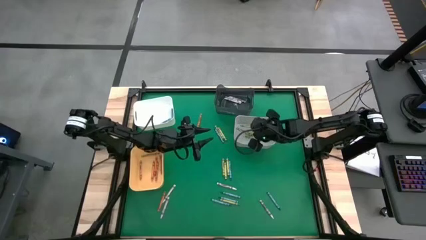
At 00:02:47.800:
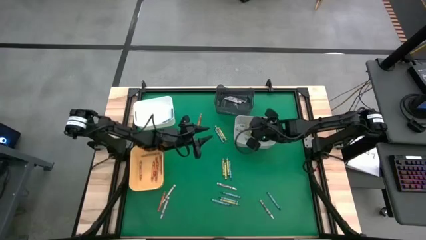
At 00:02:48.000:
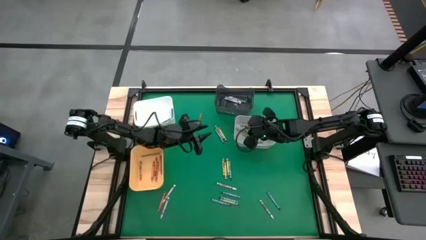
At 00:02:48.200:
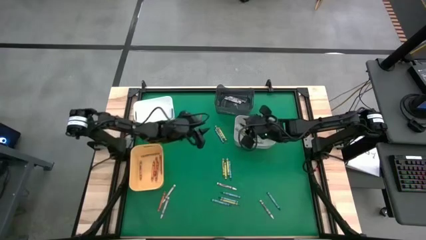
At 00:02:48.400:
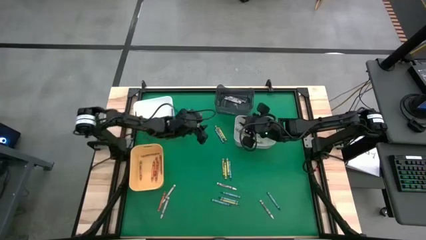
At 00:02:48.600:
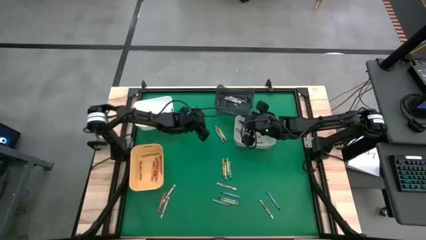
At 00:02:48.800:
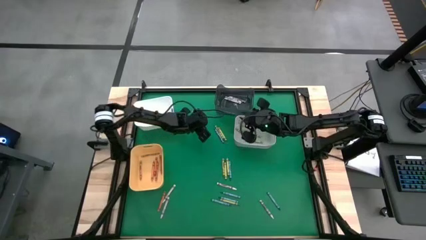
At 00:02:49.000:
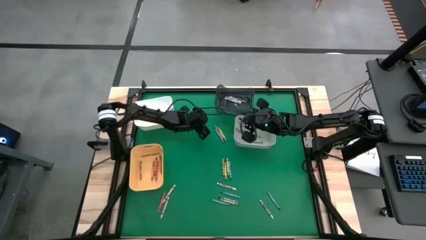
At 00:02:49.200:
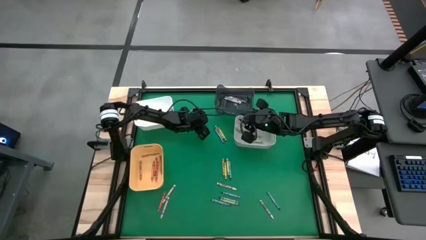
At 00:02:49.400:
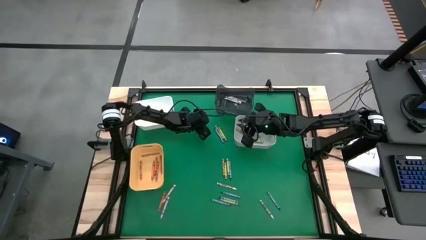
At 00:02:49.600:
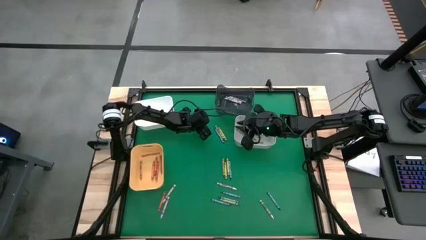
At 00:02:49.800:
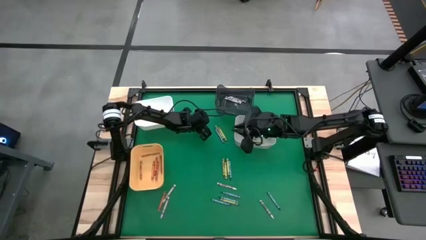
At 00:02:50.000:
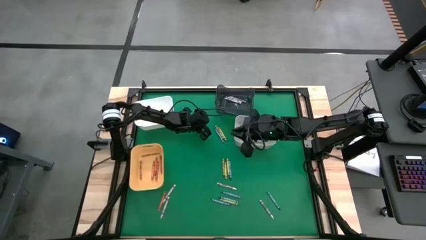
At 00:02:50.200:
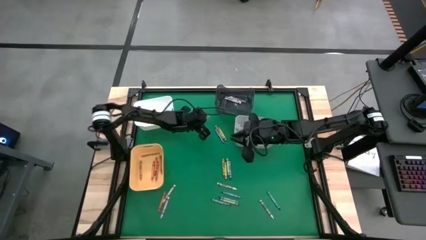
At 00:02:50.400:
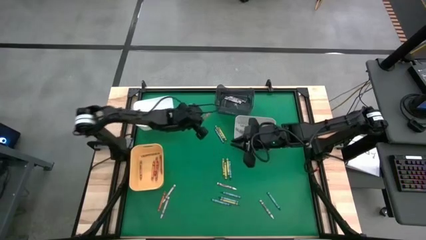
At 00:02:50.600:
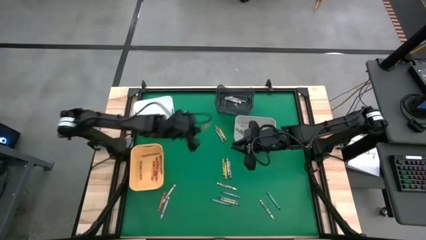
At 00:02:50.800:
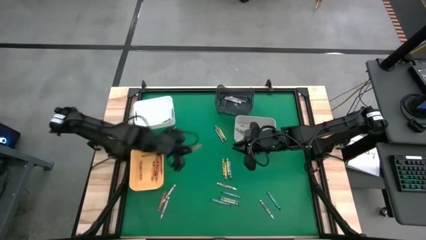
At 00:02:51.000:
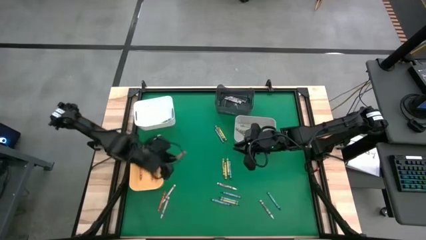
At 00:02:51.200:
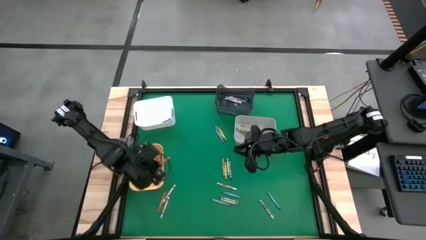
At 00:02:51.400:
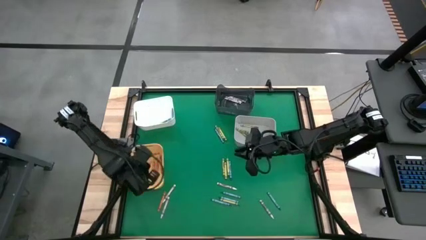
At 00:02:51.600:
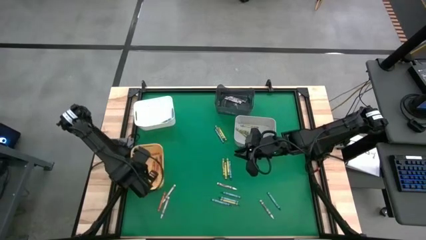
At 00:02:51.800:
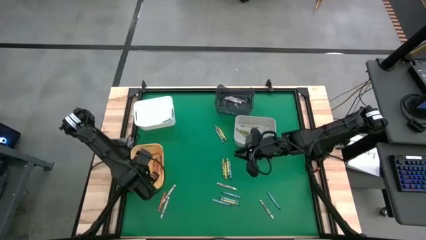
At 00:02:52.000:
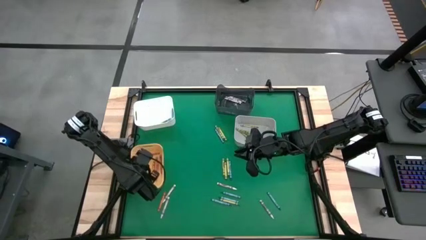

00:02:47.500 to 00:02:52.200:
Task: Sort crayons
Put the orange crayon into the orange bin

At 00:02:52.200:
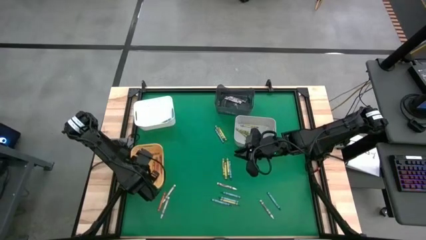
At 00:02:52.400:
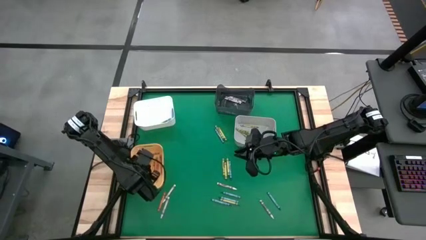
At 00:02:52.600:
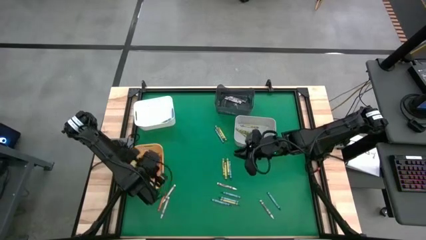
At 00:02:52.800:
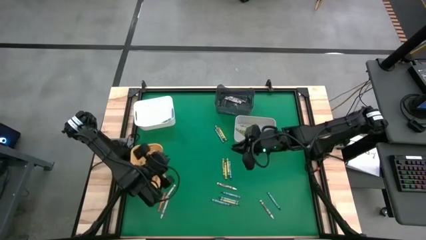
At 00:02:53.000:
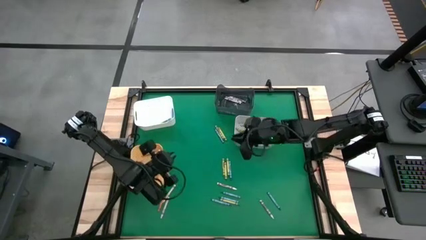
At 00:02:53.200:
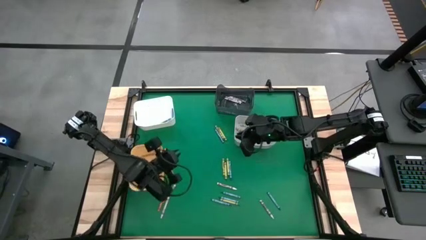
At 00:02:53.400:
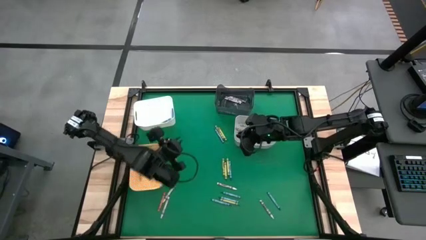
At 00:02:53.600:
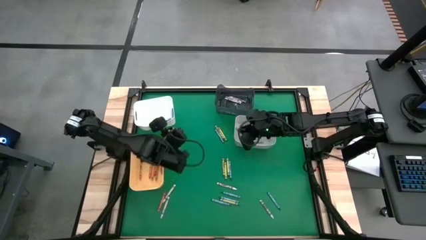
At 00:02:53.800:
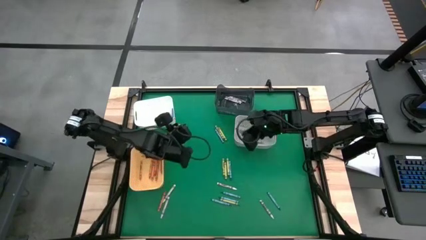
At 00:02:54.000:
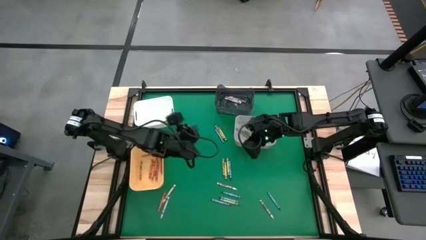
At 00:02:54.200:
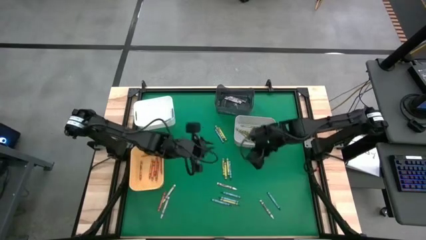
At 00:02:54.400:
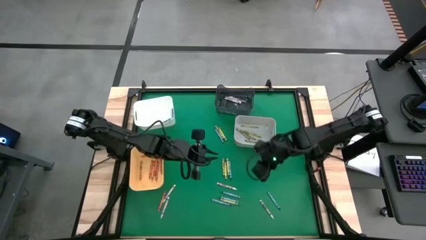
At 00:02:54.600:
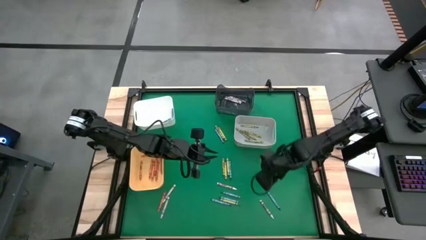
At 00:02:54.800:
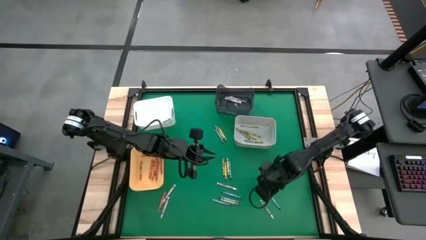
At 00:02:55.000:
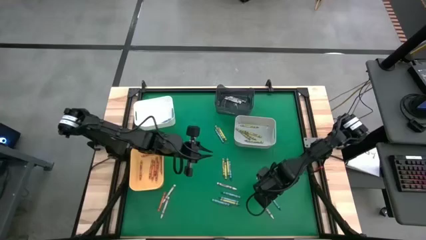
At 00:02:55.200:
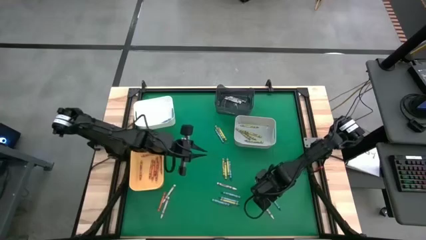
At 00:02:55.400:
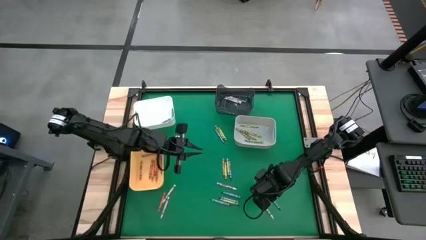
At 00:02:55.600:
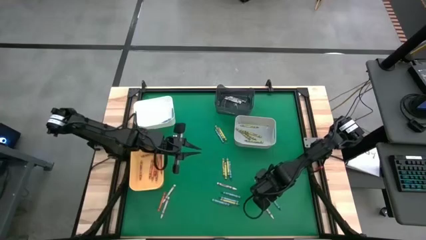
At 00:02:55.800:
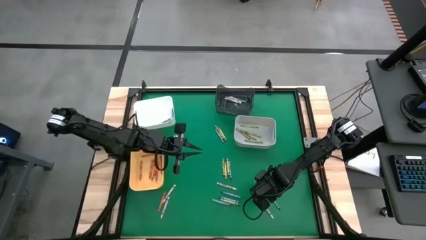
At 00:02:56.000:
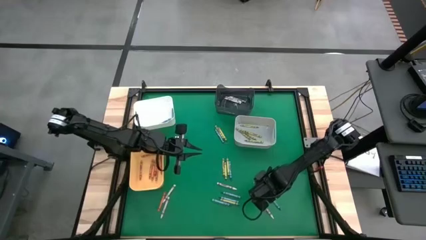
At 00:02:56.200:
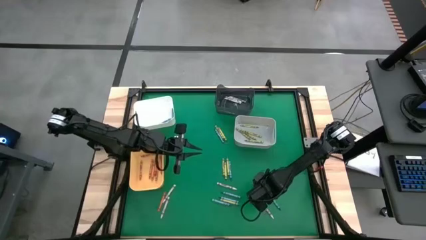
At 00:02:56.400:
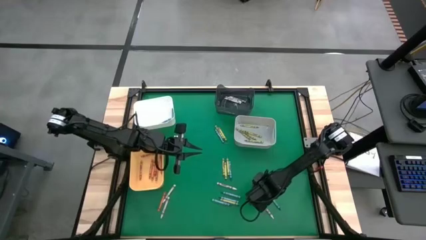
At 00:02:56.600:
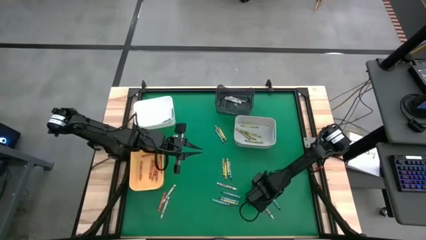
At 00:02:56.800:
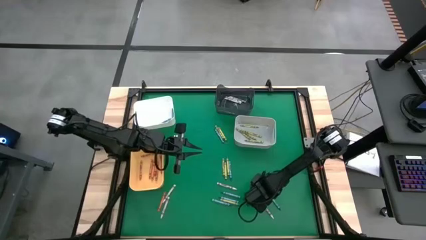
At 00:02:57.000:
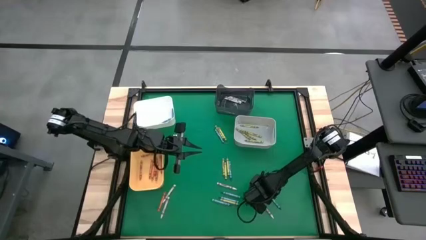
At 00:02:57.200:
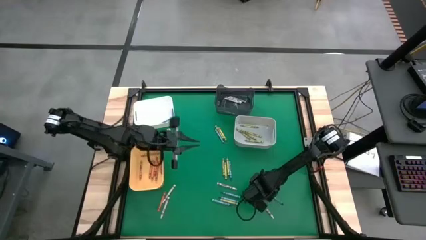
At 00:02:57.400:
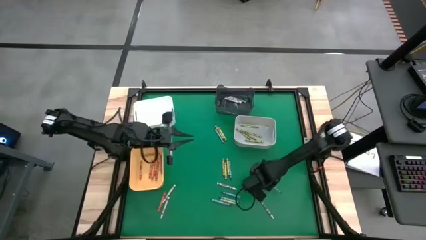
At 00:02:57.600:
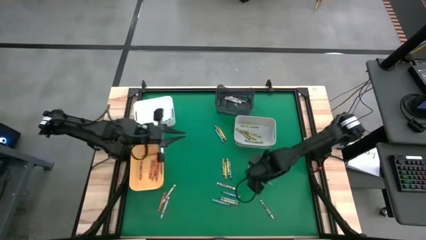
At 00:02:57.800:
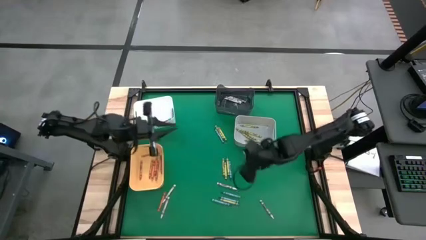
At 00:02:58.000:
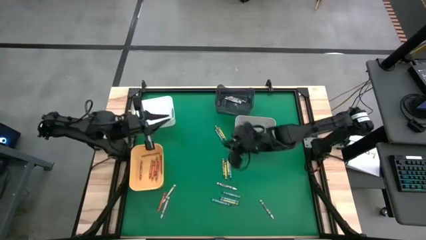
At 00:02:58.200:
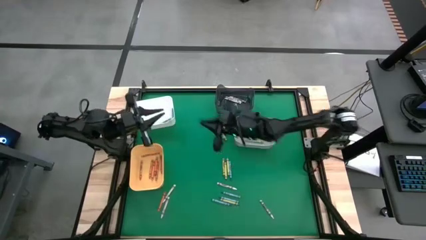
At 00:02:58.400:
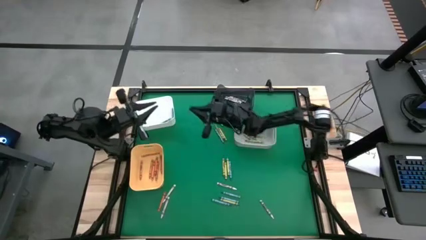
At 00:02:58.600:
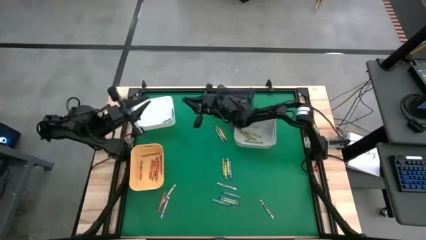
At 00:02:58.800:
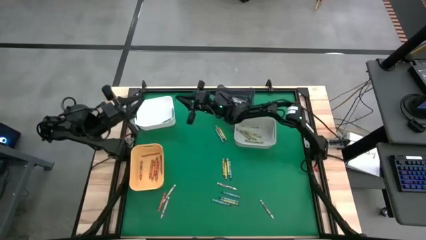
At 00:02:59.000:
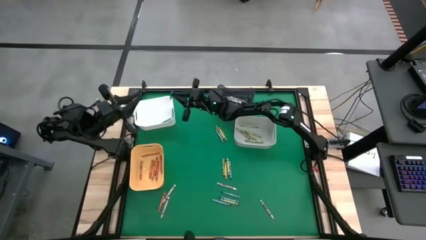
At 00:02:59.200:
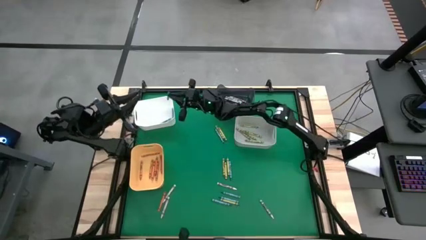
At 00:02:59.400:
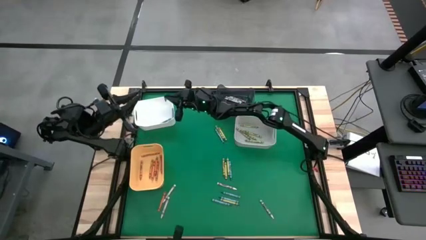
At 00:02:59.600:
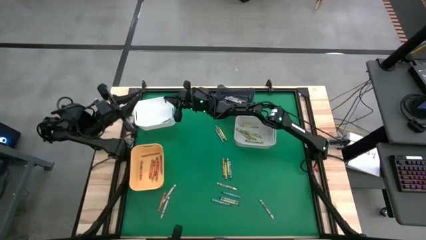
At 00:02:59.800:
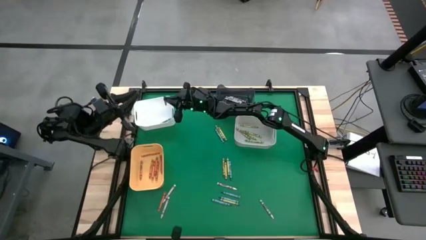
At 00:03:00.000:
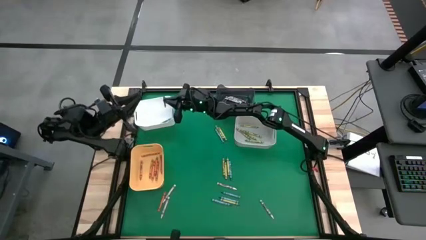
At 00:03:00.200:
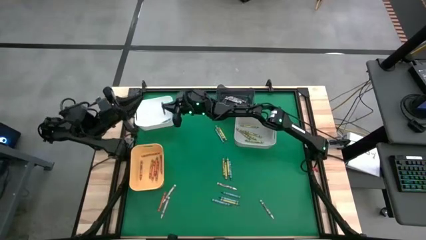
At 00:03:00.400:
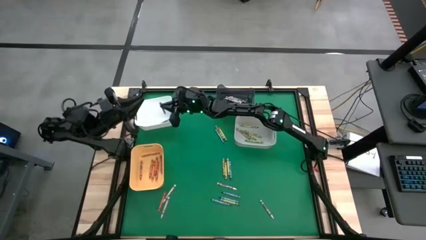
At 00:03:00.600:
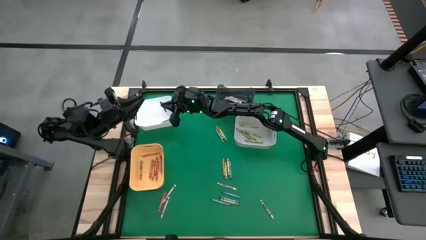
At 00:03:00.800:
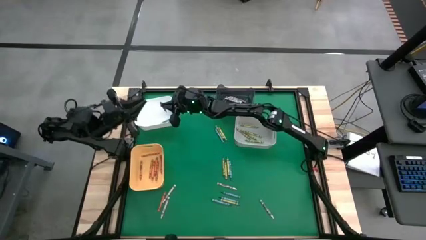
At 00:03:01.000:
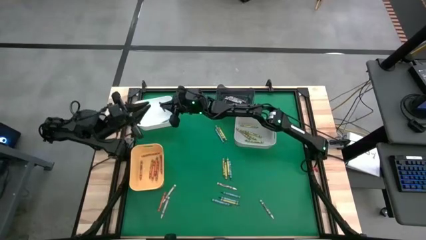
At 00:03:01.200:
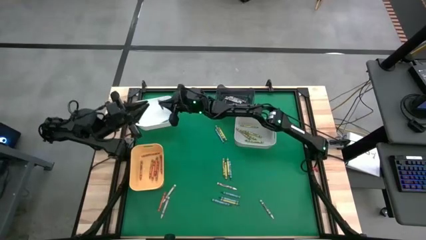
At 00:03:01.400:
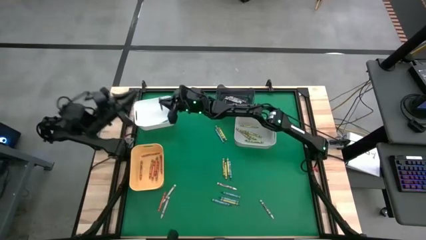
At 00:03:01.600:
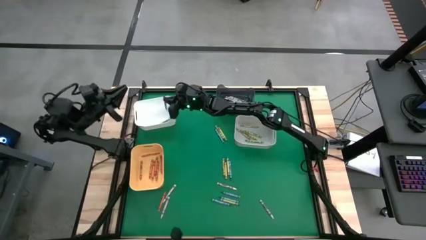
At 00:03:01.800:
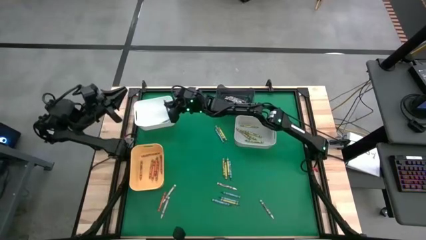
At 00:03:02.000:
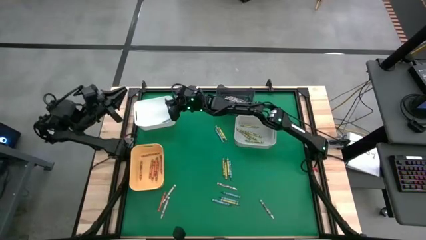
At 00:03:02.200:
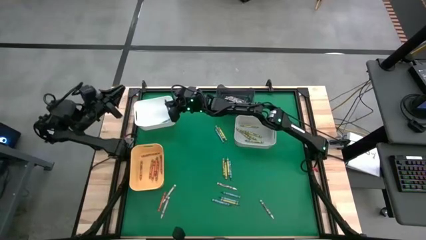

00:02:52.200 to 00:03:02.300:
Put the blue crayon into the white bin
